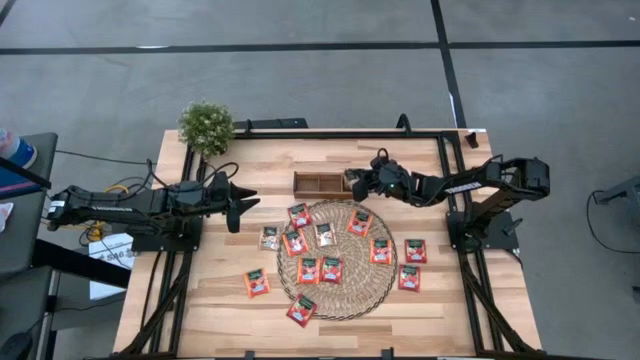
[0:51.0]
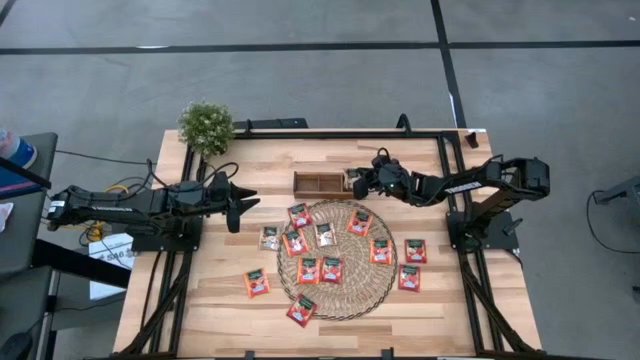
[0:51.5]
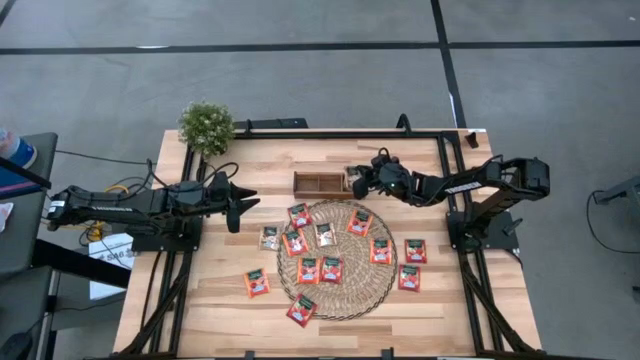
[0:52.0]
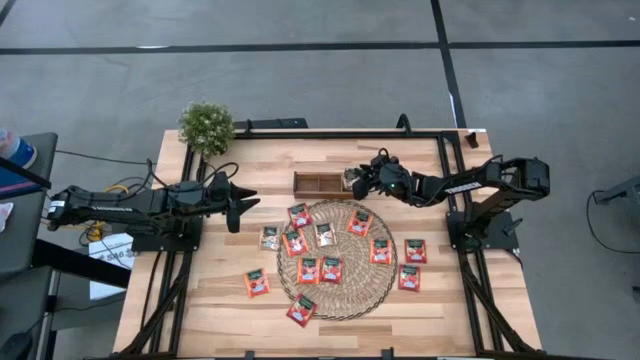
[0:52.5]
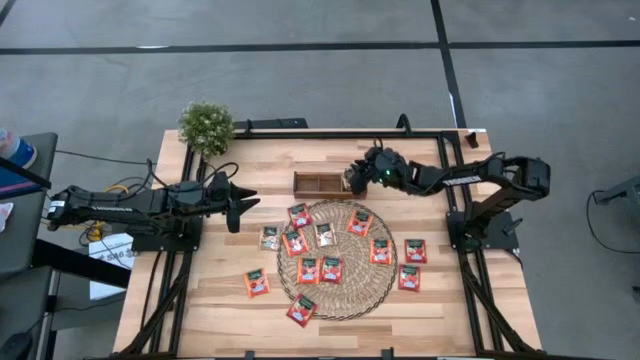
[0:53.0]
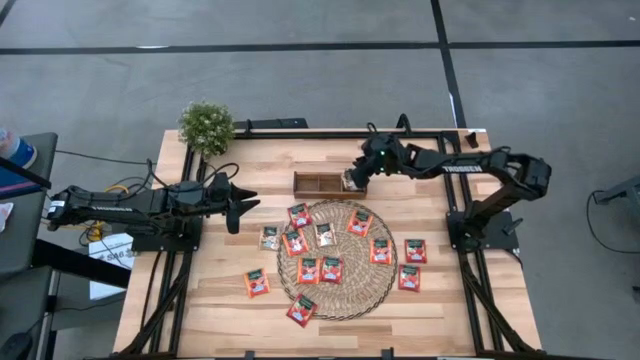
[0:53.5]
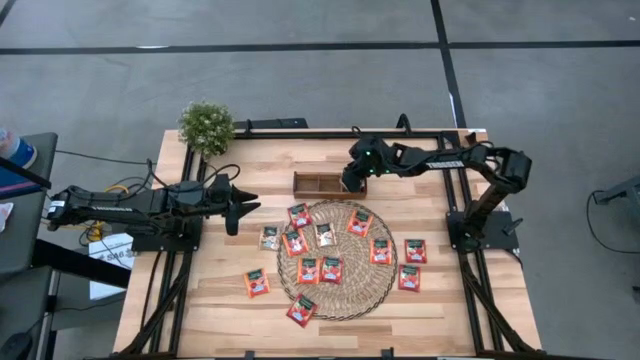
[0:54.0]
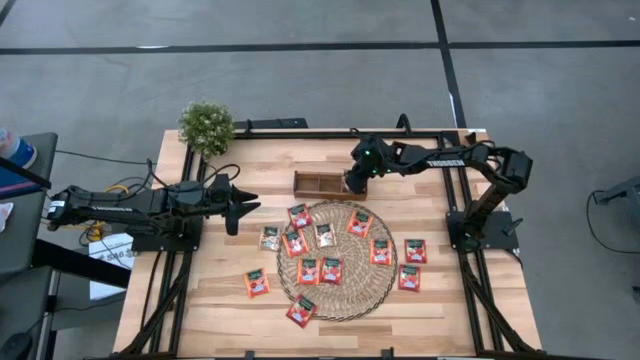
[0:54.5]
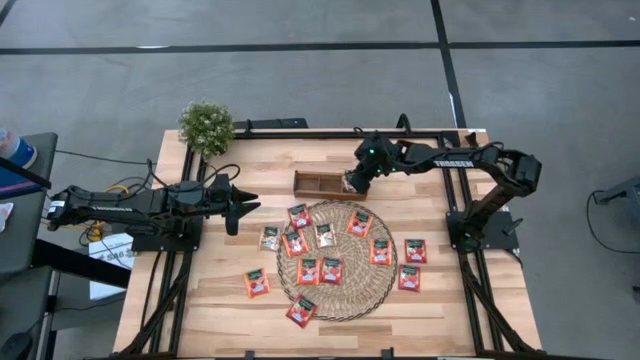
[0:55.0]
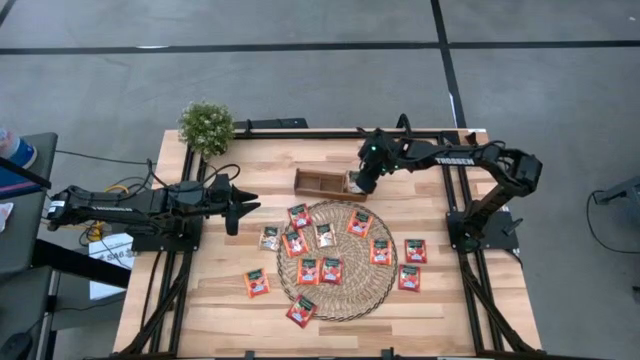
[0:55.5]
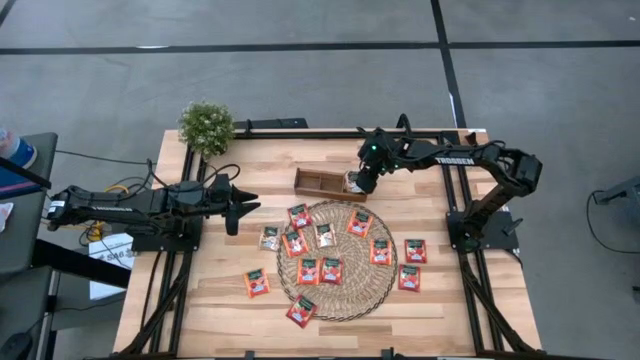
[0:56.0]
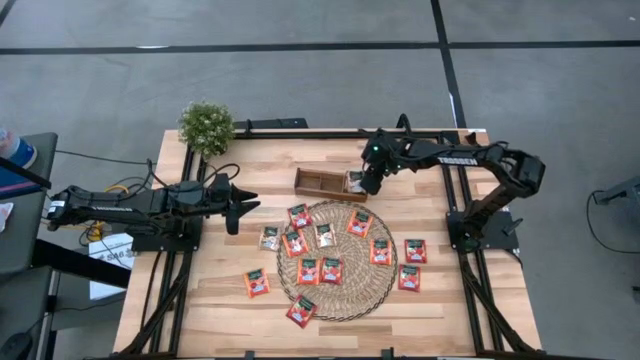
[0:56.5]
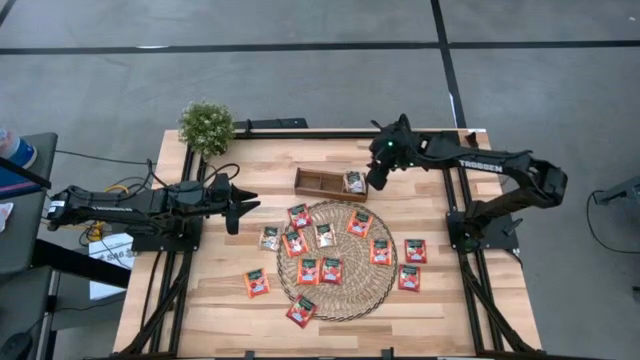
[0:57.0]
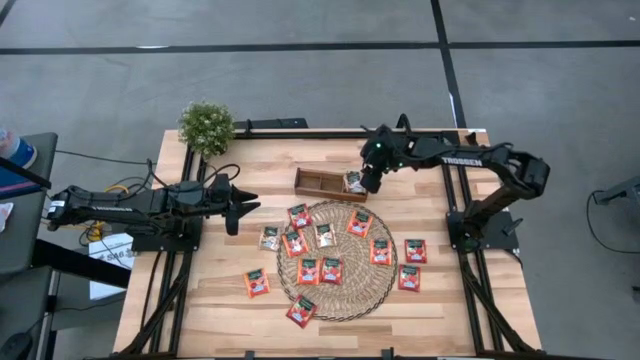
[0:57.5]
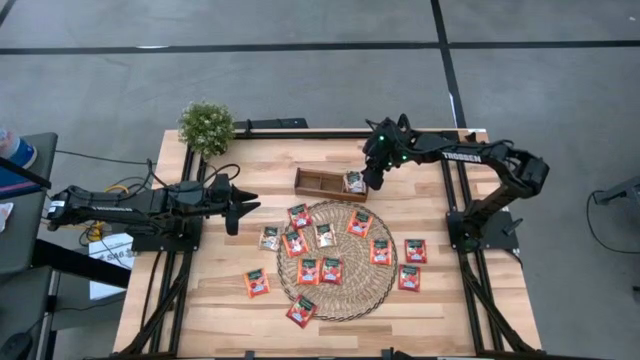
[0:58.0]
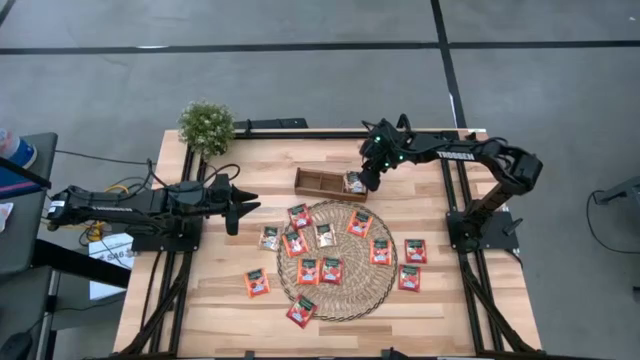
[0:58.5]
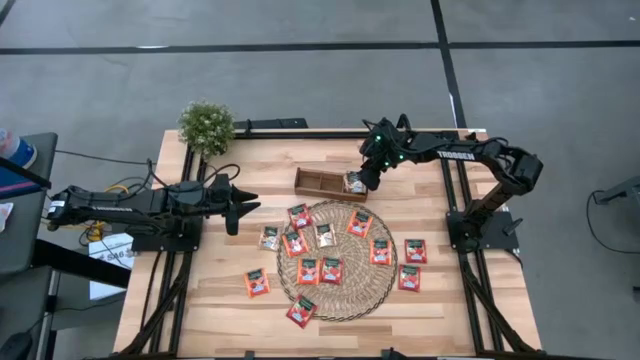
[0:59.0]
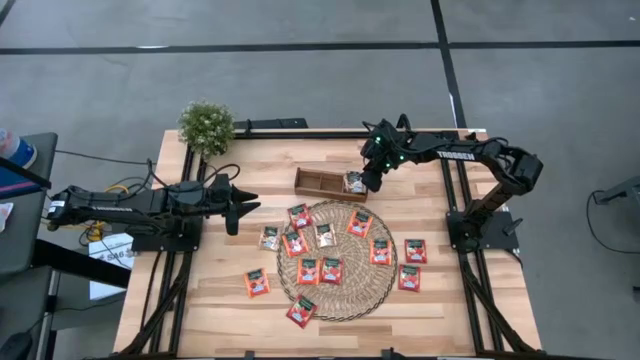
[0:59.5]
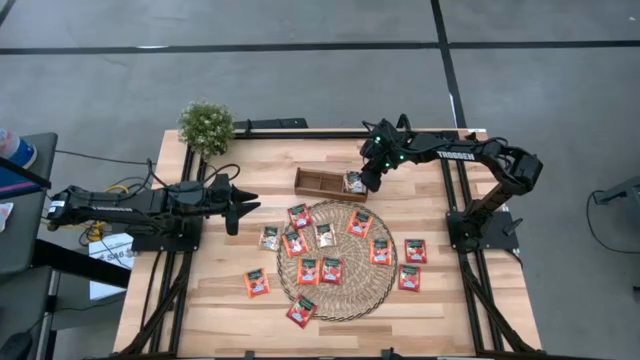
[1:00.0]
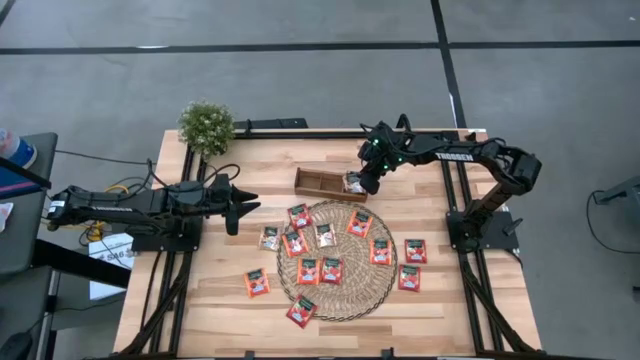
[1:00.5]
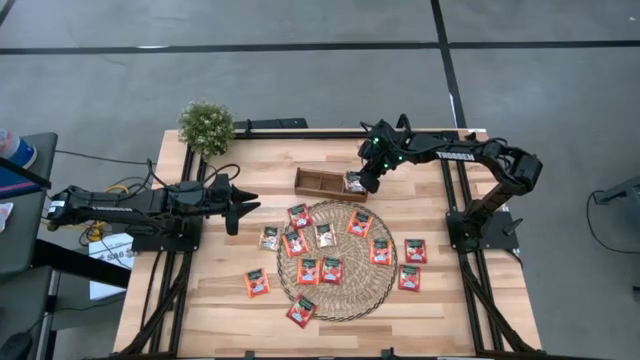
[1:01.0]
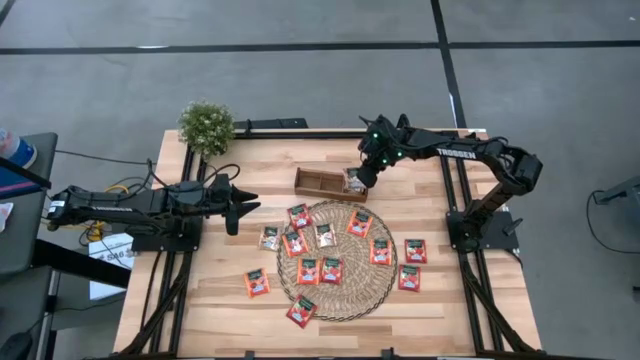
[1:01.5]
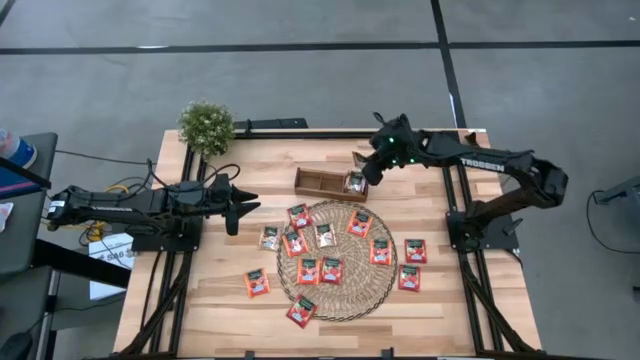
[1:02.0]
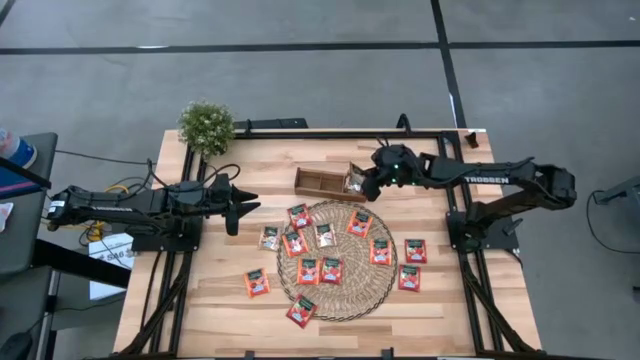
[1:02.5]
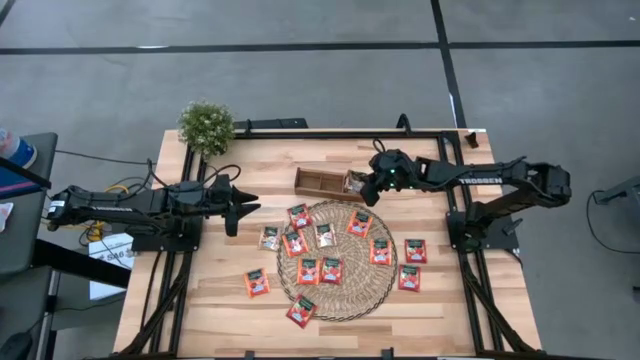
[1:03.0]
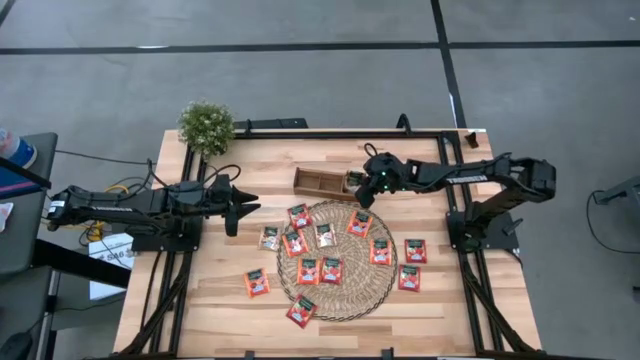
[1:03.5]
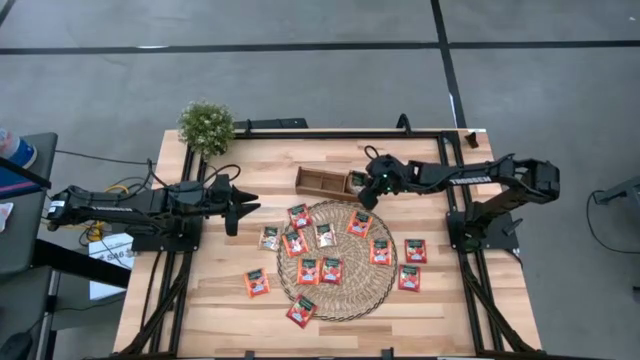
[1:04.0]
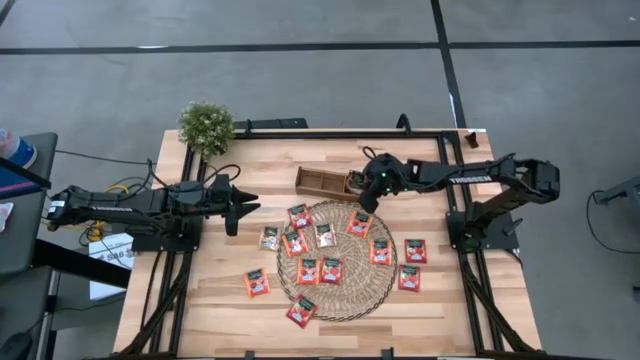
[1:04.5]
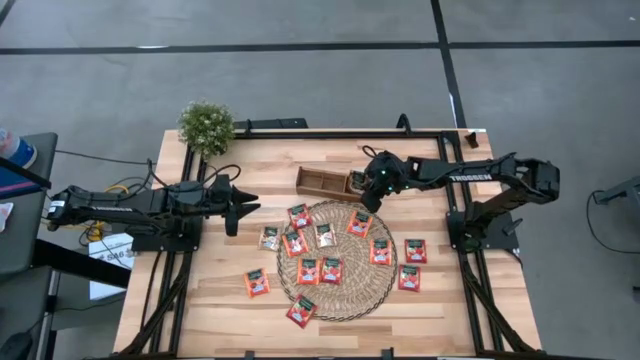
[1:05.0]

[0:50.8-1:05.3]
Task: Pick & Place Tea
Put the brown tea bag into the right section of the wooden organizer

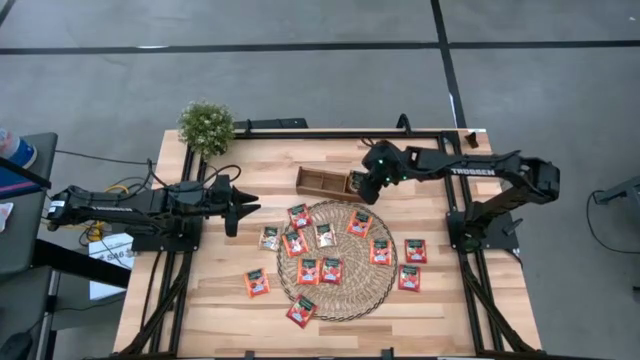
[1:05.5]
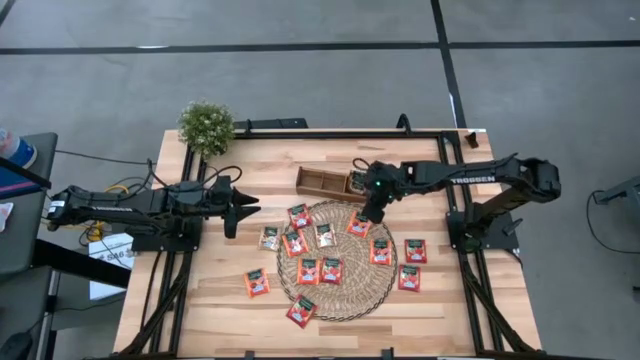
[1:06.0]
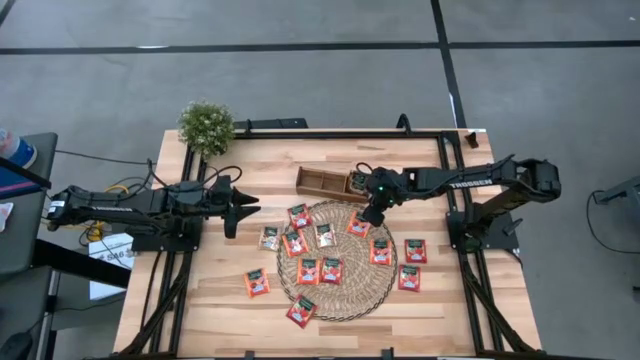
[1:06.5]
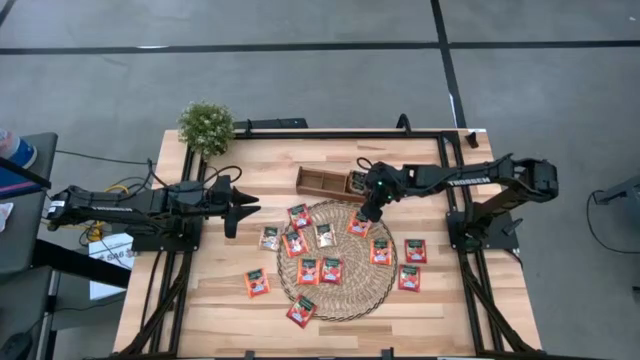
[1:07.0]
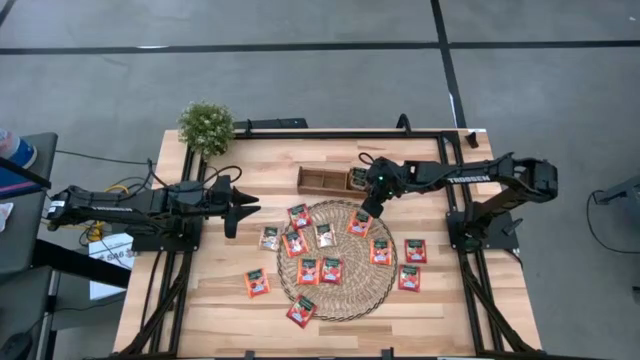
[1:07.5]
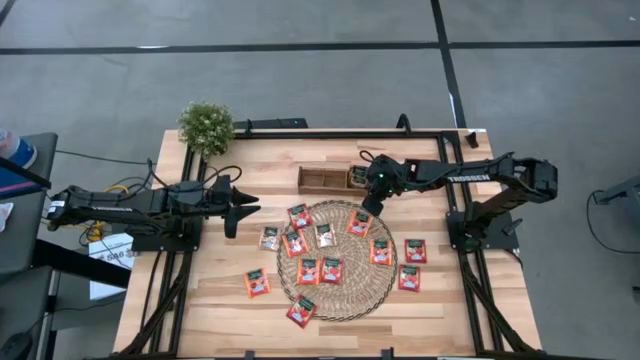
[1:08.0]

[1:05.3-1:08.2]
Adjust the wooden organizer

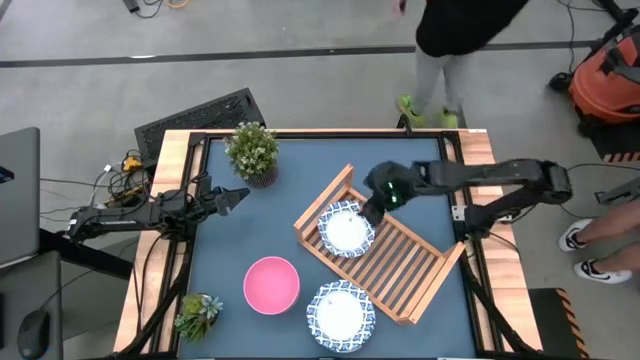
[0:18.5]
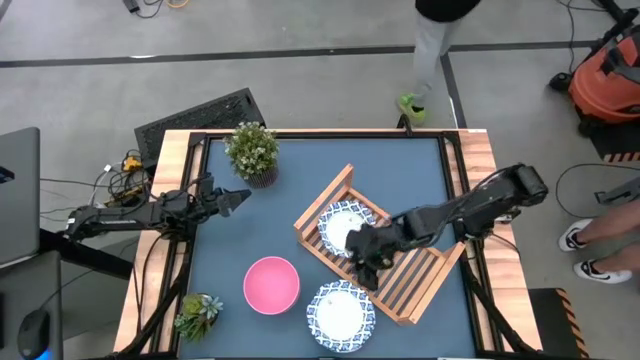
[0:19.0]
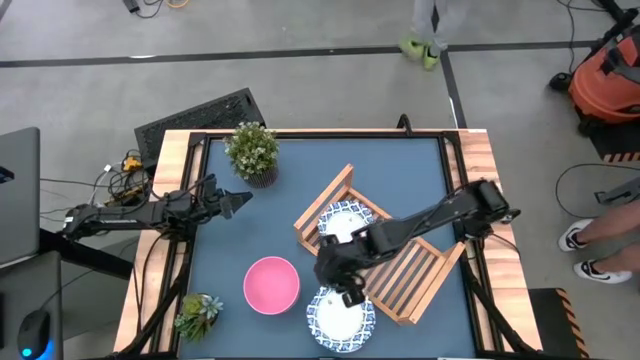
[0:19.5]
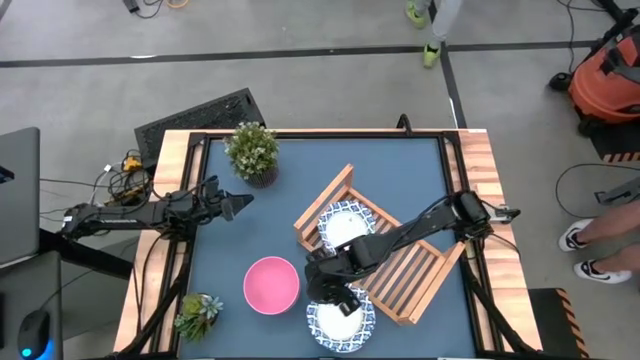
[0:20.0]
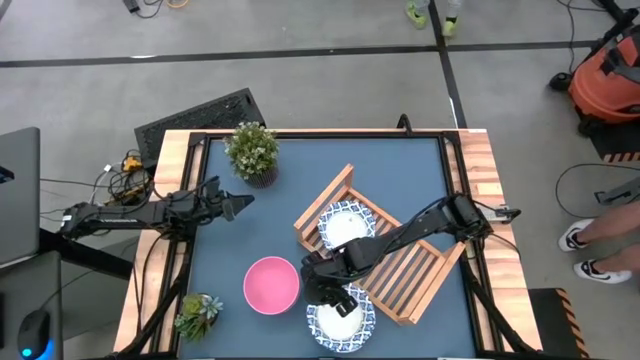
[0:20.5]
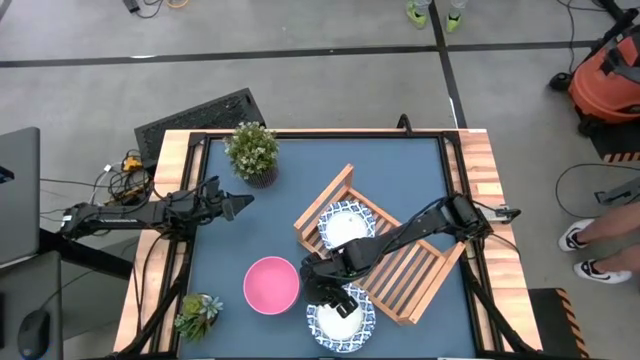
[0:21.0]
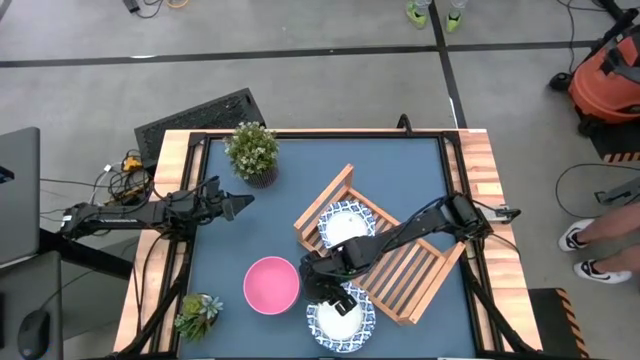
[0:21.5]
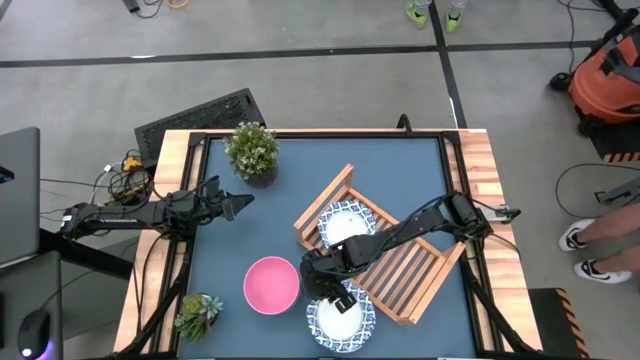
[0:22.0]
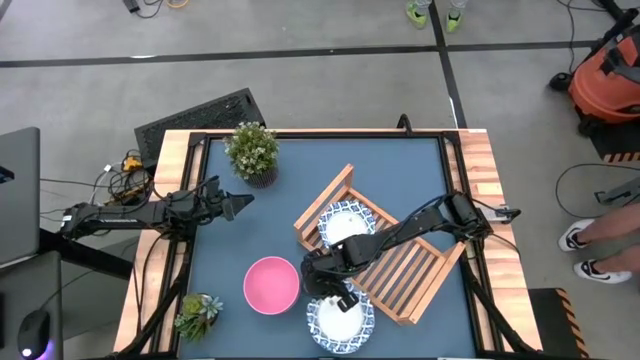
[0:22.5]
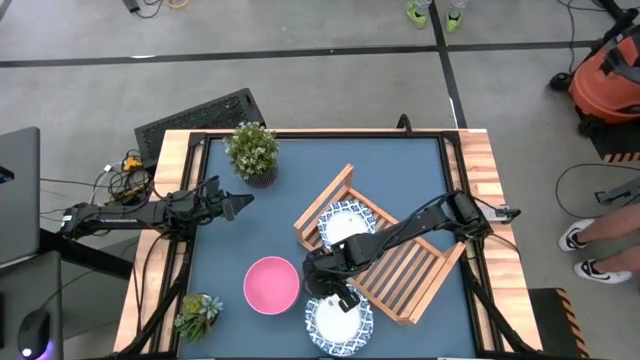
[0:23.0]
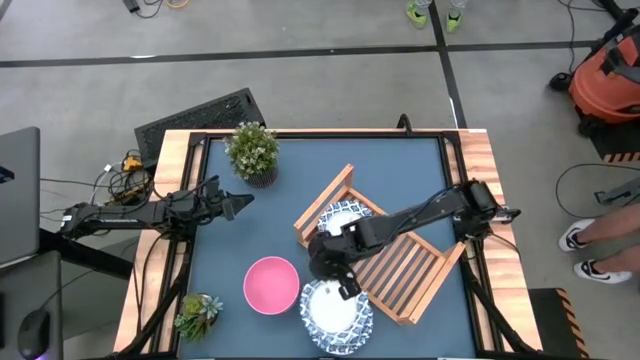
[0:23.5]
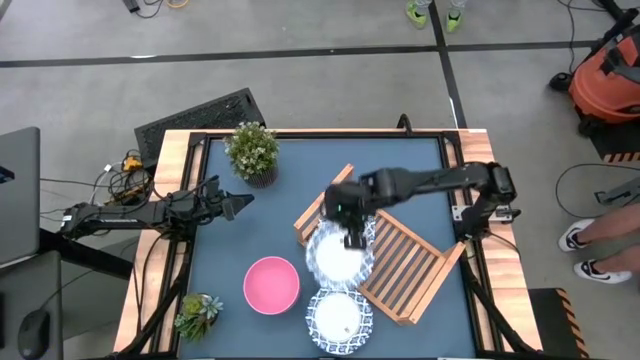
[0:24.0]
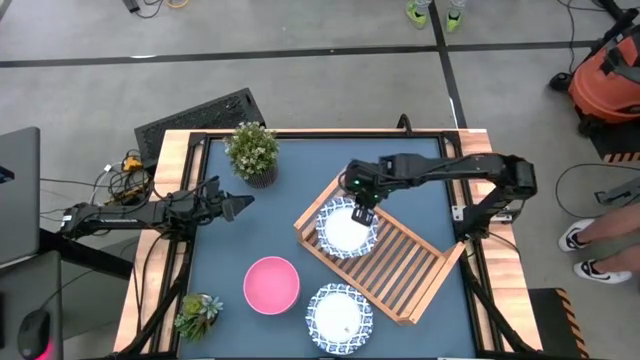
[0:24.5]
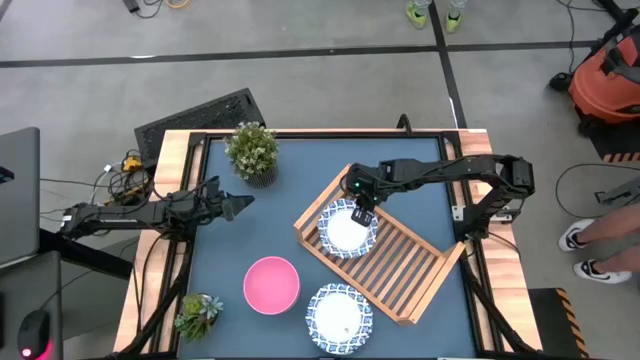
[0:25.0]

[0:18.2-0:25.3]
Task: Place and stack bowls onto a shelf
Stack the blue patterned bowl on the top of the blue patterned bowl on the shelf
